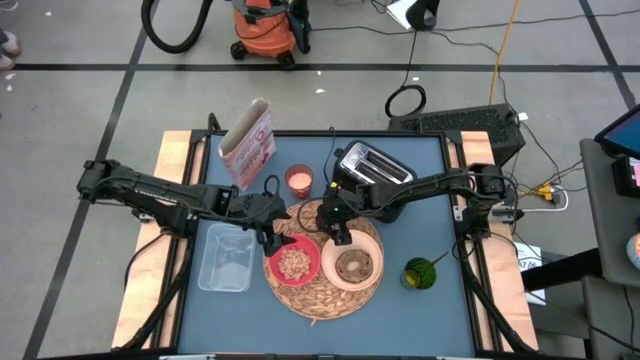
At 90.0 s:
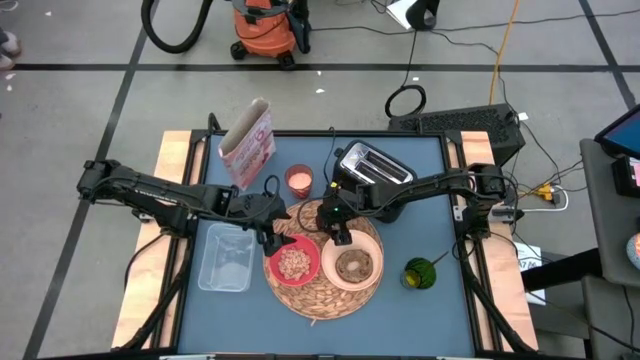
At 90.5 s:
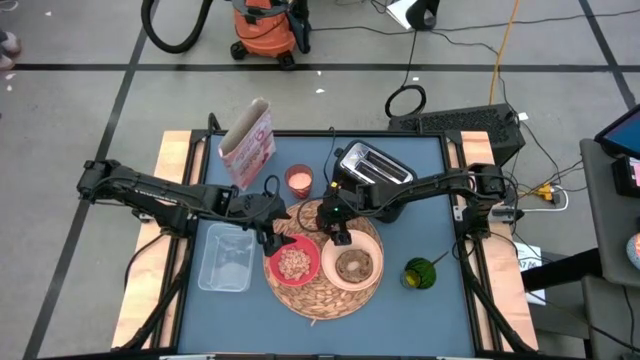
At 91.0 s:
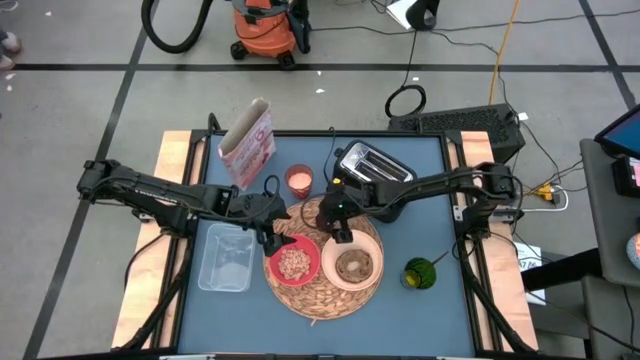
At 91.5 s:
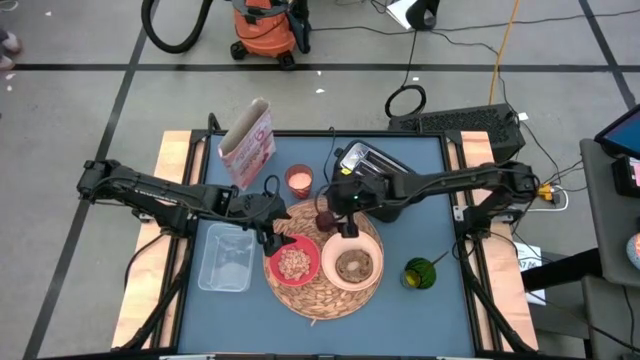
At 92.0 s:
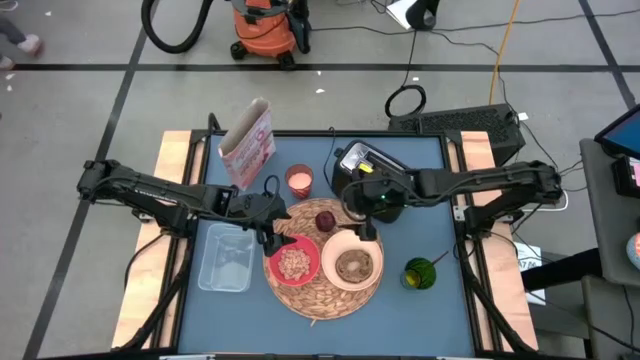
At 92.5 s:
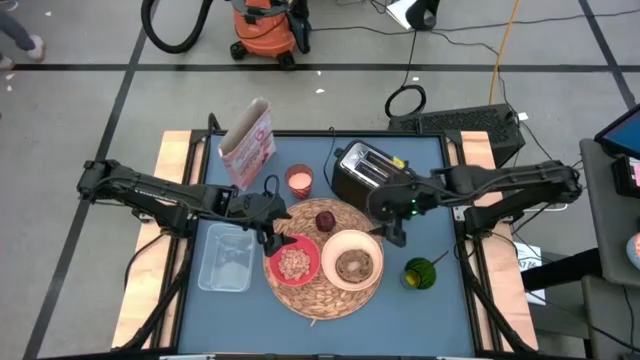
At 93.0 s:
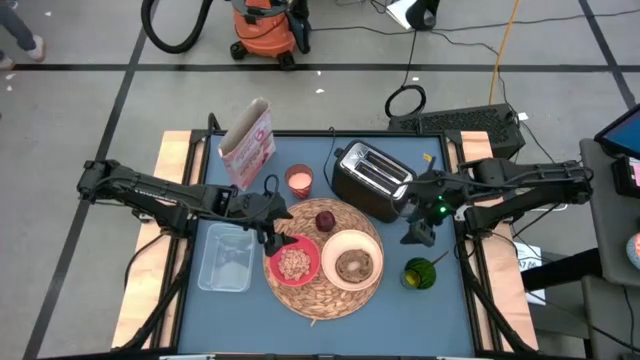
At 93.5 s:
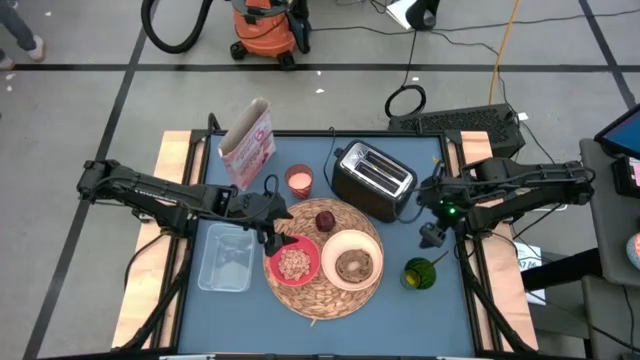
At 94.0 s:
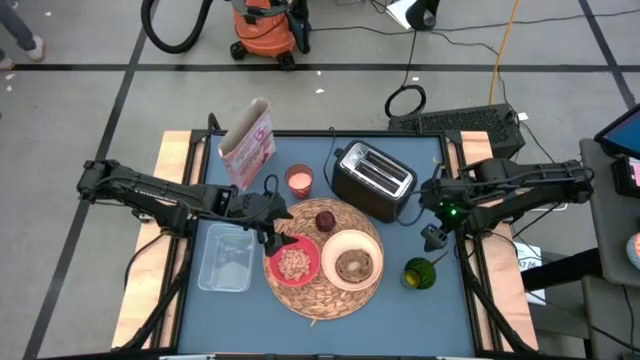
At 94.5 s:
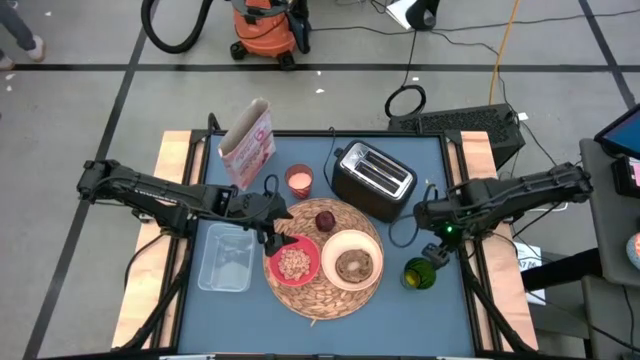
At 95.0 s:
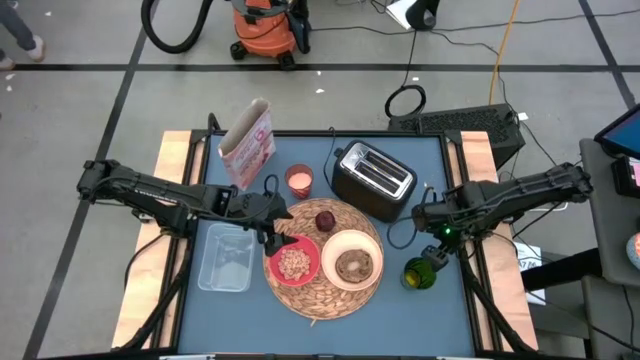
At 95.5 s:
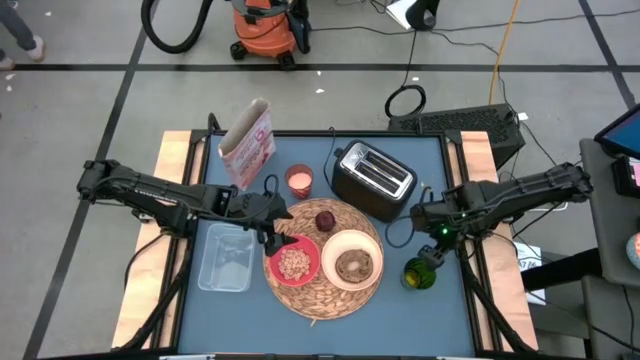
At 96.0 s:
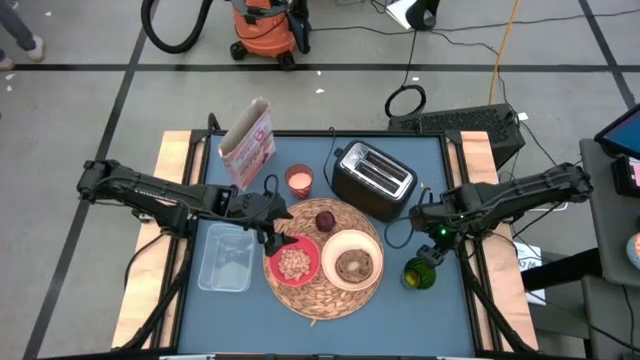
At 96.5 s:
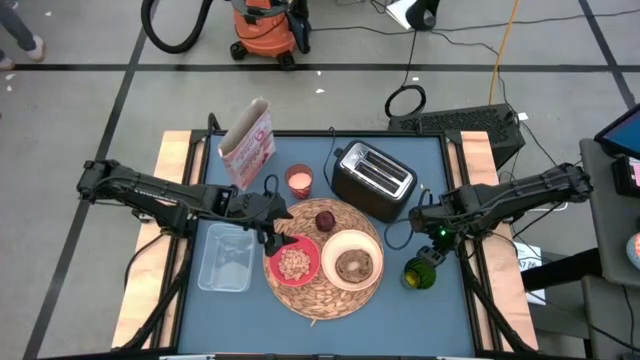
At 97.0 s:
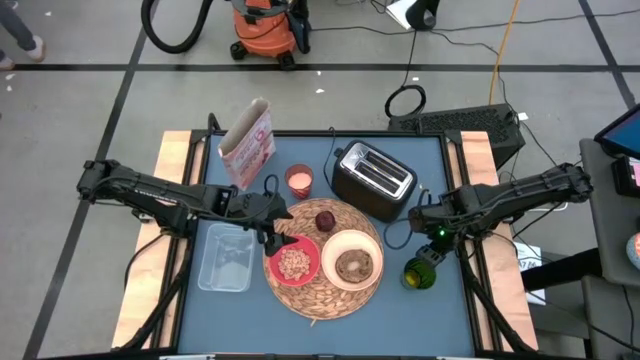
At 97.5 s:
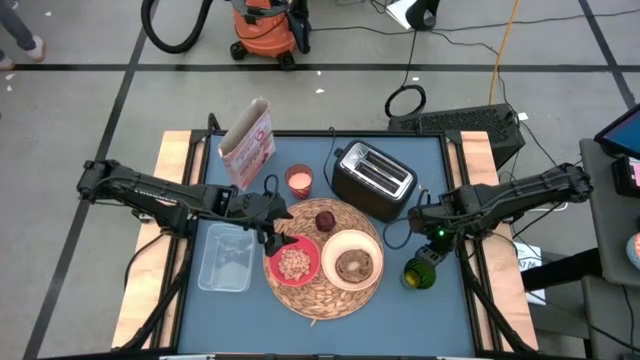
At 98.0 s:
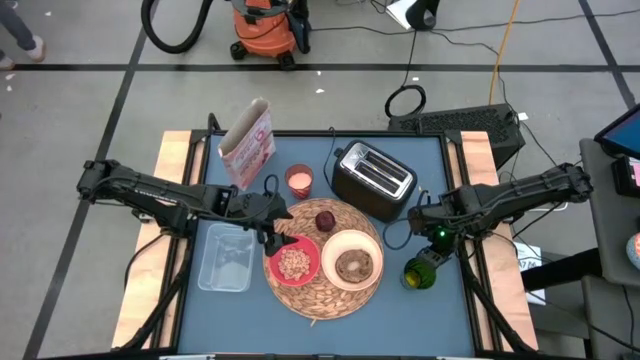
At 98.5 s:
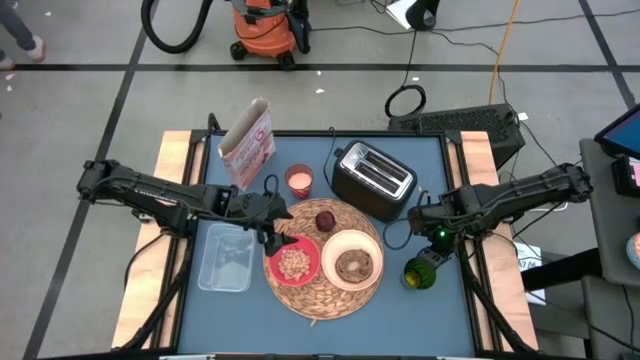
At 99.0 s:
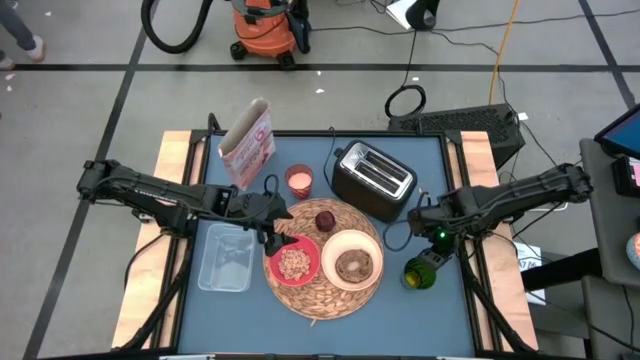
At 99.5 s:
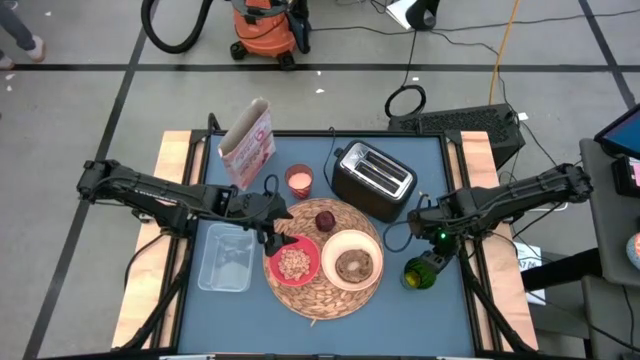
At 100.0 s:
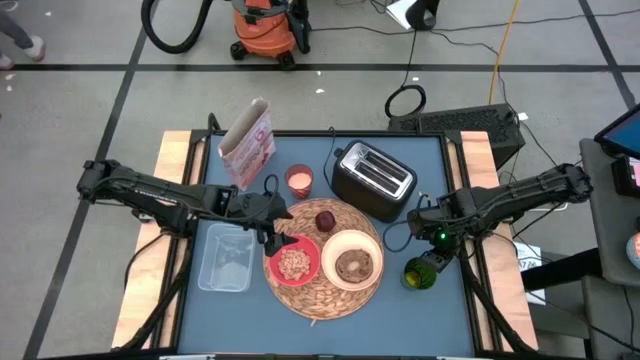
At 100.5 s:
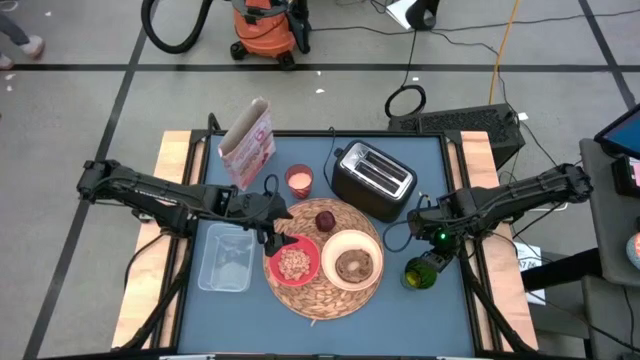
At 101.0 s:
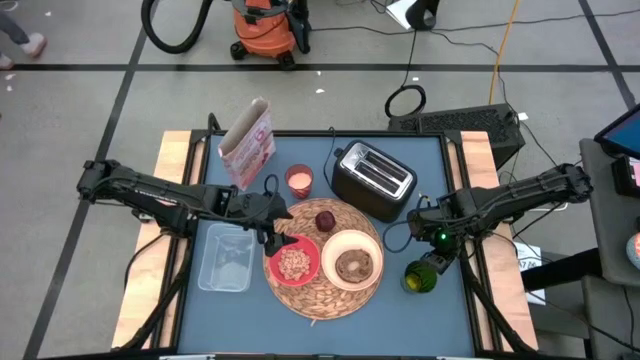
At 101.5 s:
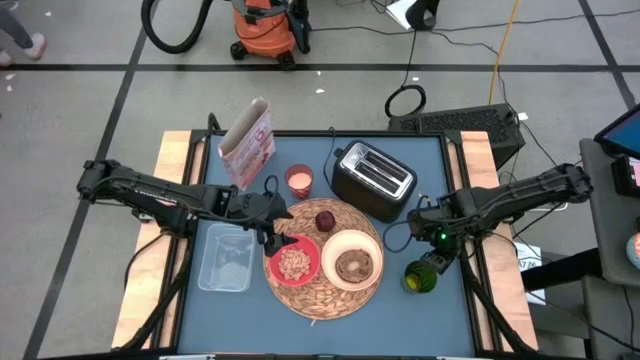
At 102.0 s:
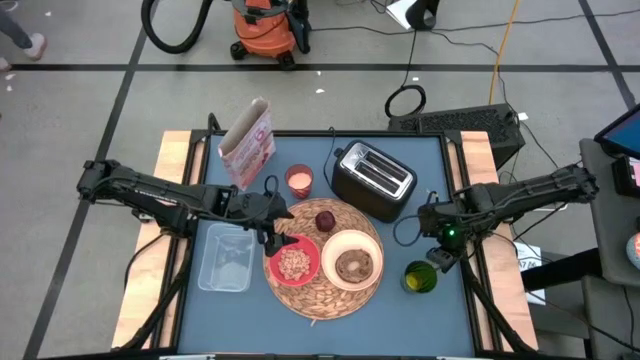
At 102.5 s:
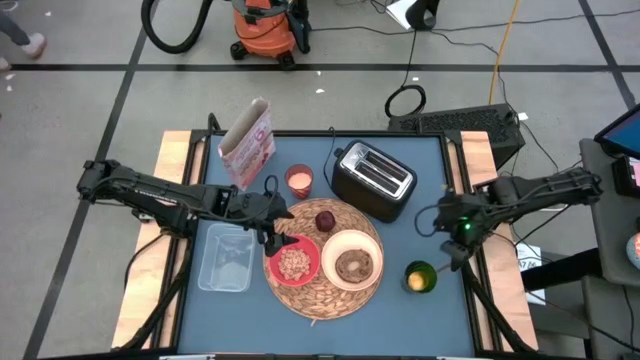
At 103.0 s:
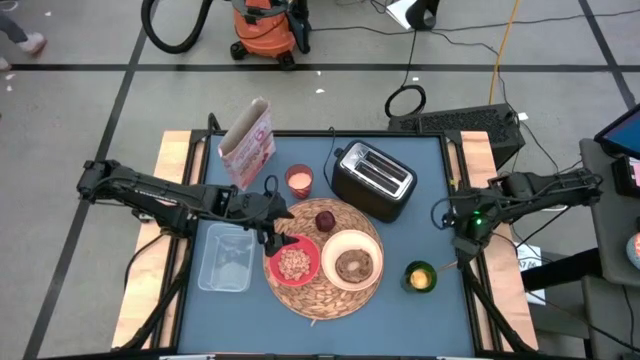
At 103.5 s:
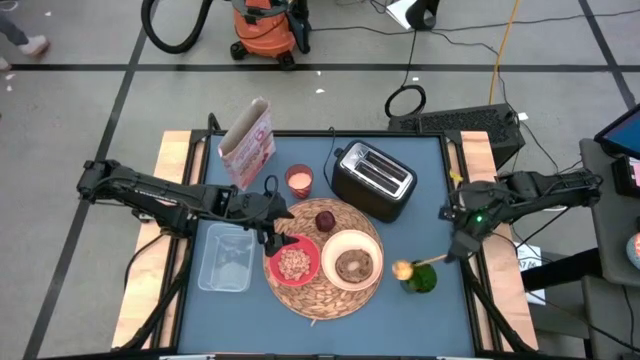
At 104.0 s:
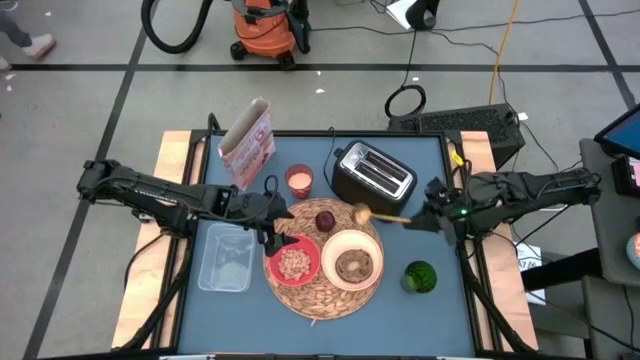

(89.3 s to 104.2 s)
Task: Arrange a breakfast setting
Put the gold spoon from the green cup to the left side of the placemat
